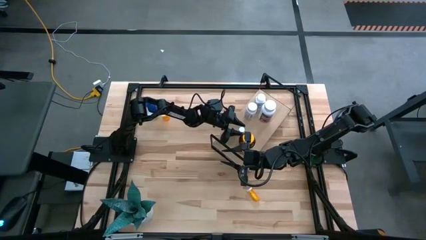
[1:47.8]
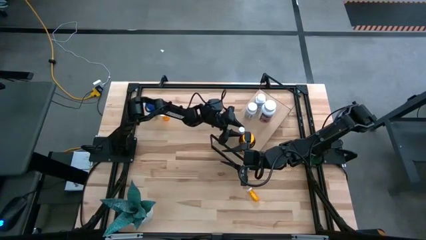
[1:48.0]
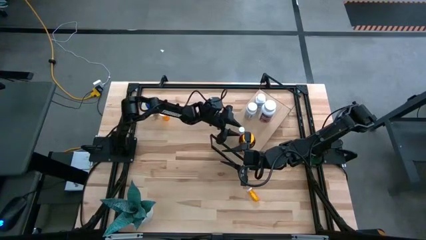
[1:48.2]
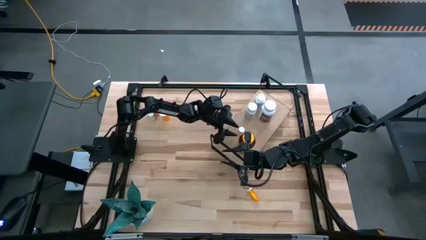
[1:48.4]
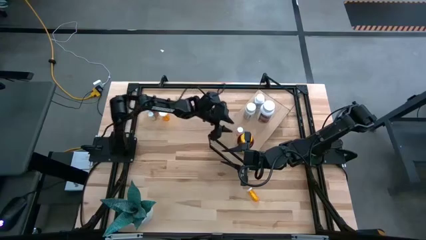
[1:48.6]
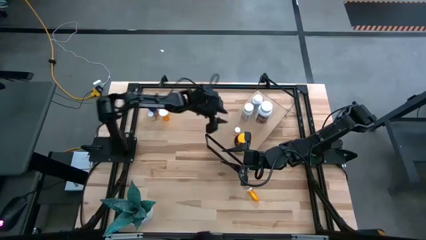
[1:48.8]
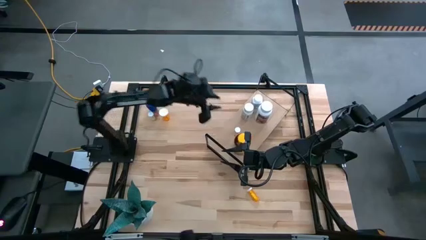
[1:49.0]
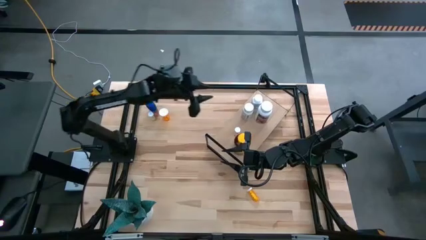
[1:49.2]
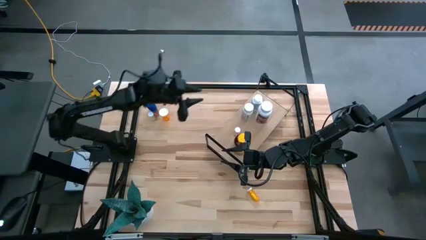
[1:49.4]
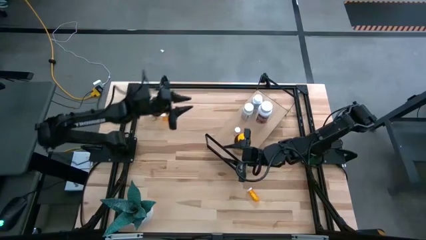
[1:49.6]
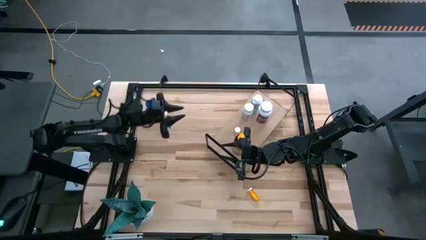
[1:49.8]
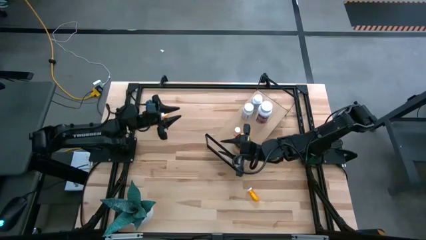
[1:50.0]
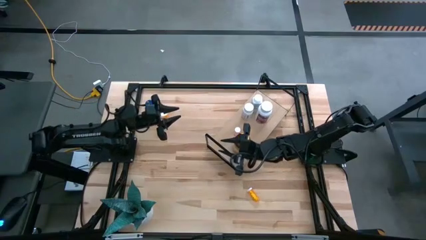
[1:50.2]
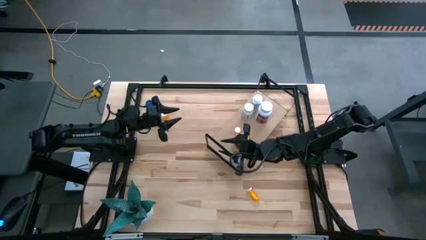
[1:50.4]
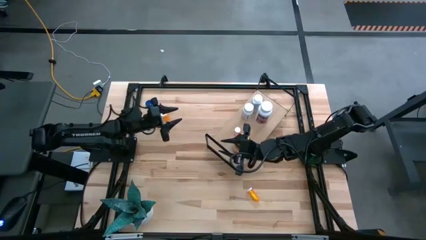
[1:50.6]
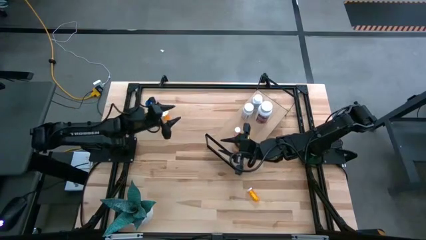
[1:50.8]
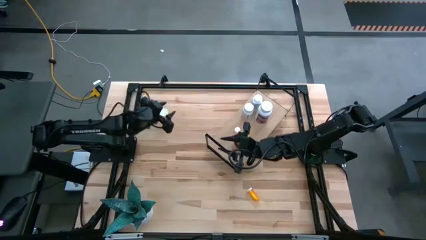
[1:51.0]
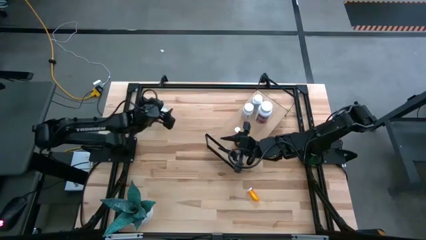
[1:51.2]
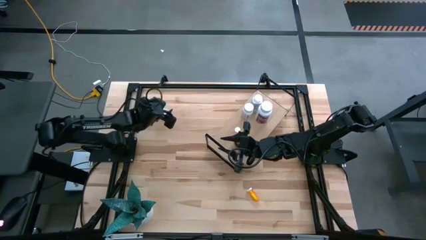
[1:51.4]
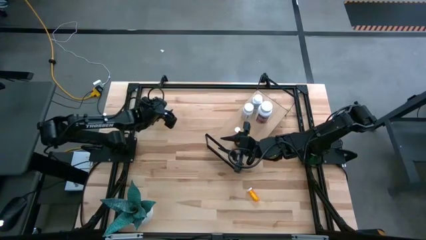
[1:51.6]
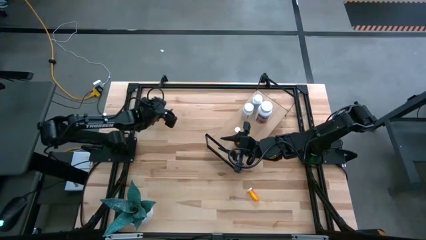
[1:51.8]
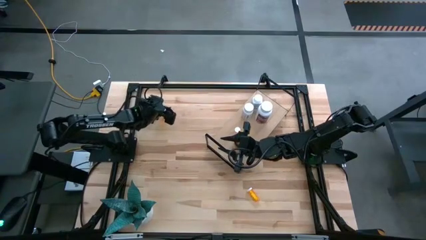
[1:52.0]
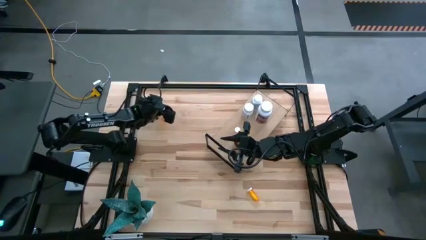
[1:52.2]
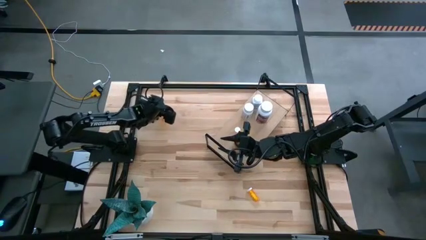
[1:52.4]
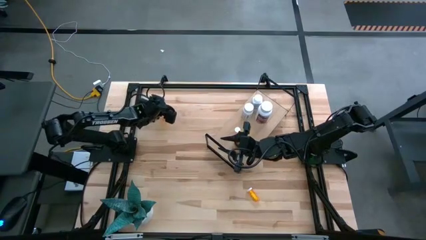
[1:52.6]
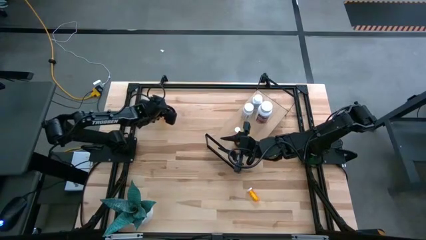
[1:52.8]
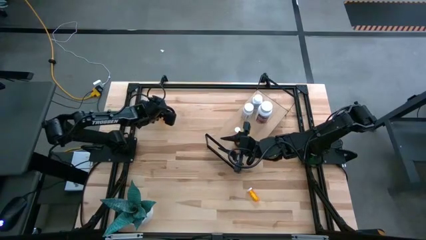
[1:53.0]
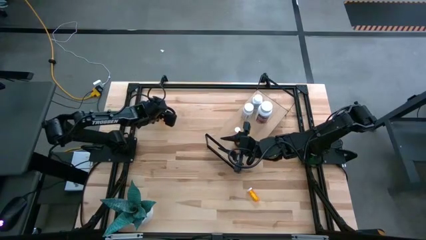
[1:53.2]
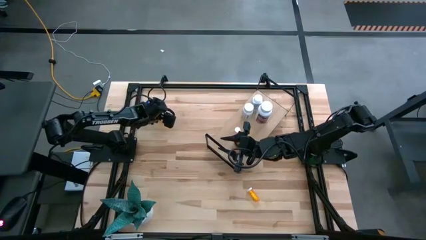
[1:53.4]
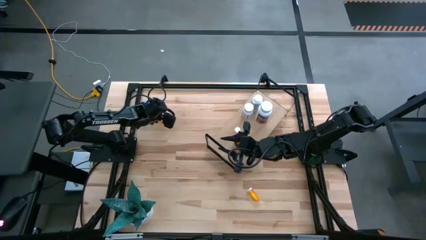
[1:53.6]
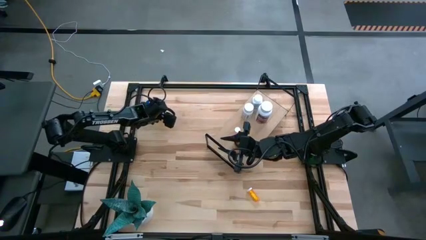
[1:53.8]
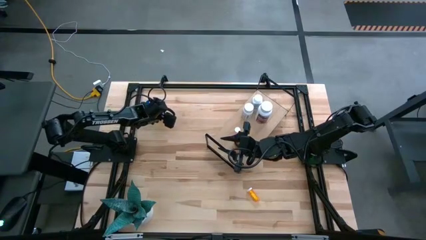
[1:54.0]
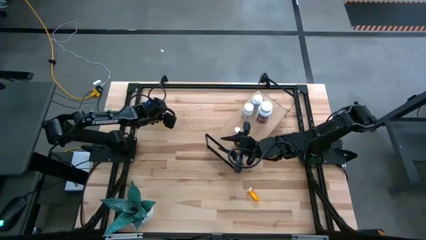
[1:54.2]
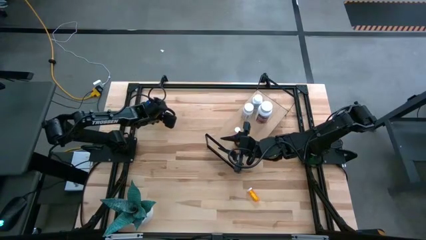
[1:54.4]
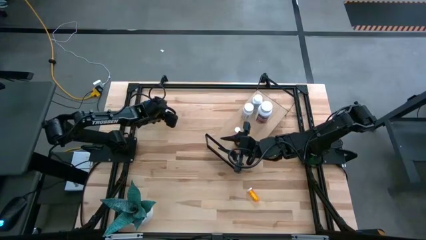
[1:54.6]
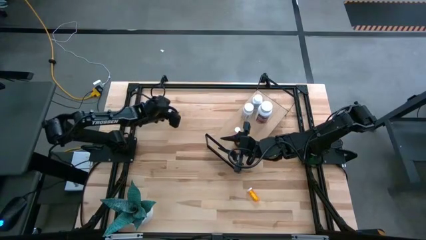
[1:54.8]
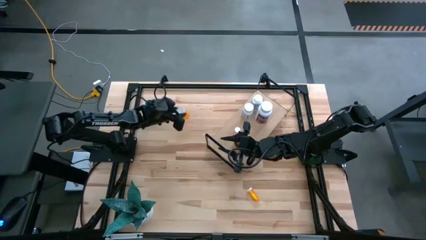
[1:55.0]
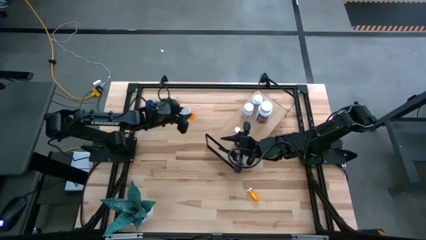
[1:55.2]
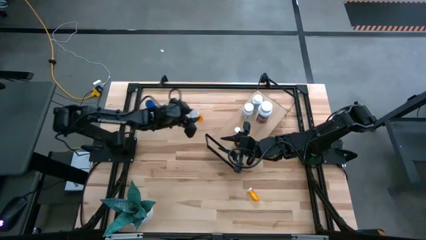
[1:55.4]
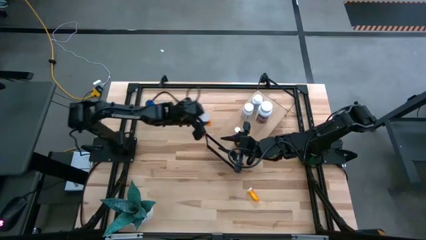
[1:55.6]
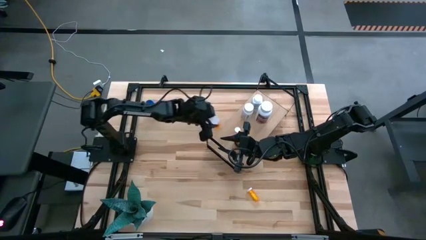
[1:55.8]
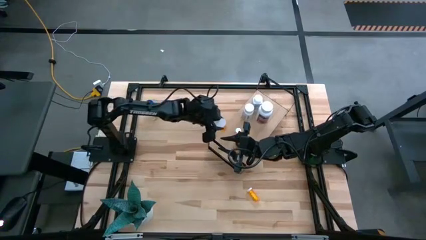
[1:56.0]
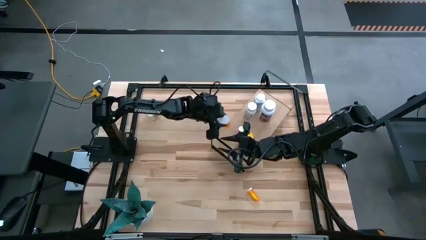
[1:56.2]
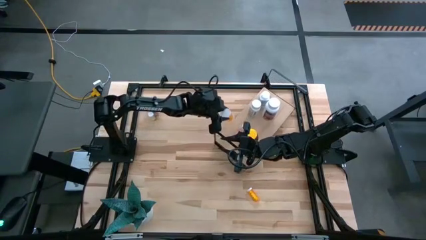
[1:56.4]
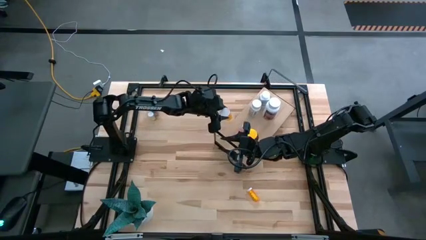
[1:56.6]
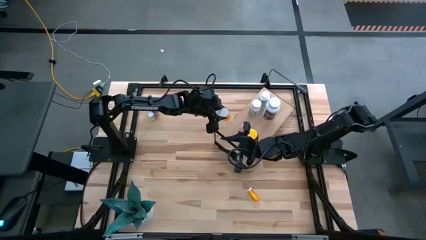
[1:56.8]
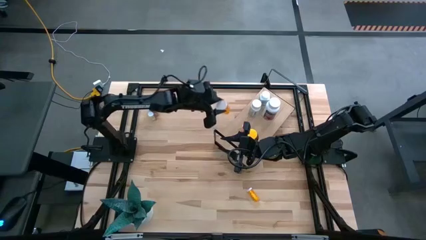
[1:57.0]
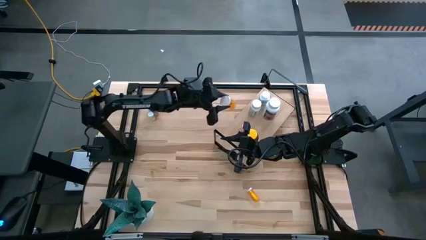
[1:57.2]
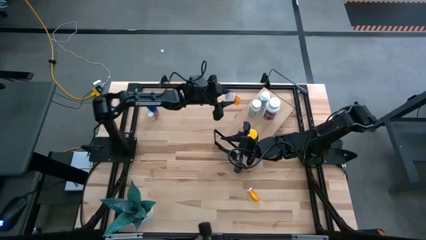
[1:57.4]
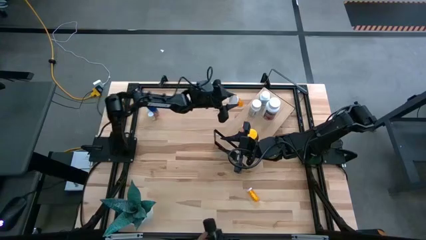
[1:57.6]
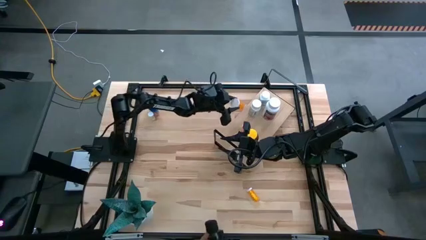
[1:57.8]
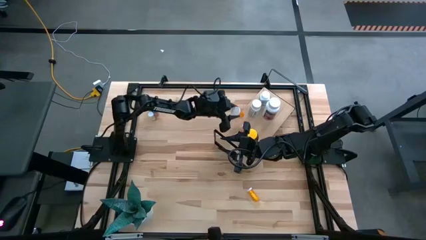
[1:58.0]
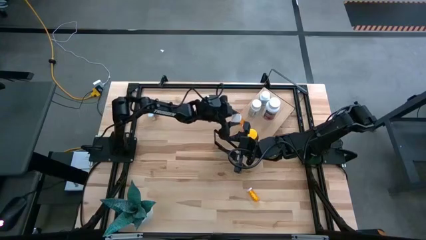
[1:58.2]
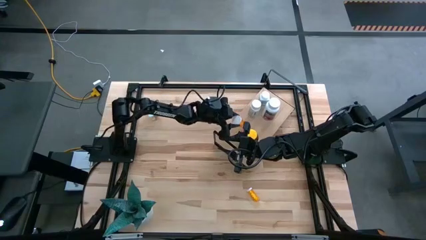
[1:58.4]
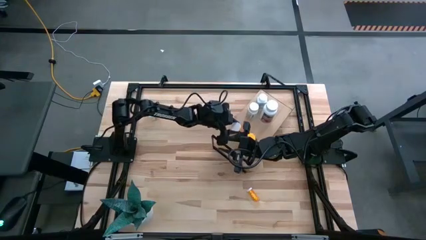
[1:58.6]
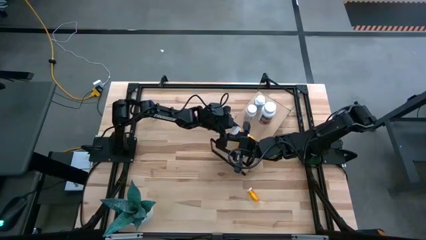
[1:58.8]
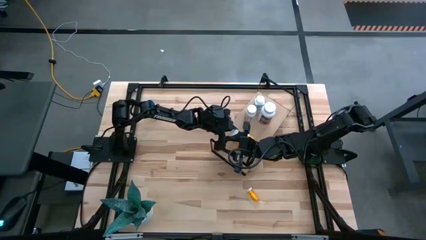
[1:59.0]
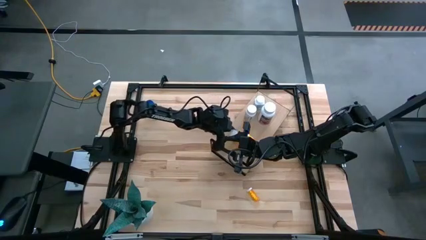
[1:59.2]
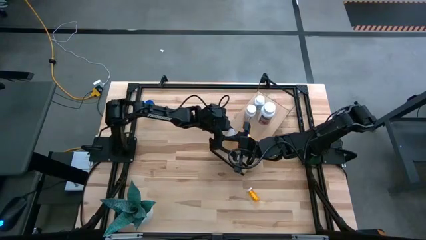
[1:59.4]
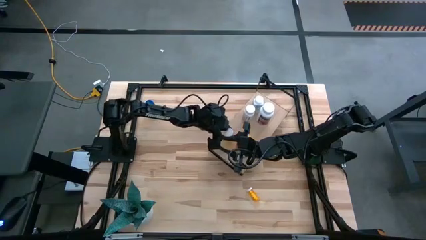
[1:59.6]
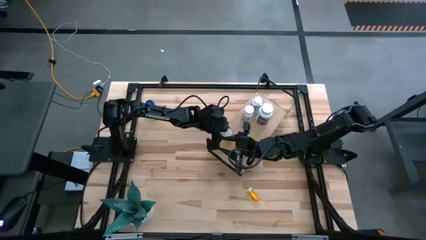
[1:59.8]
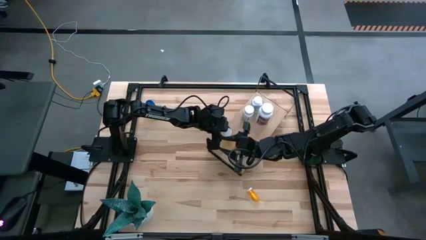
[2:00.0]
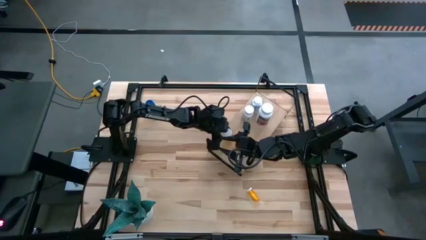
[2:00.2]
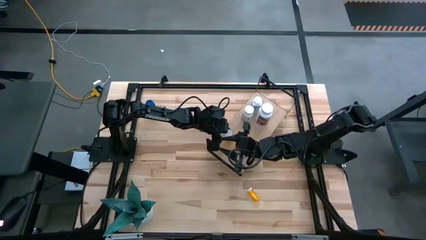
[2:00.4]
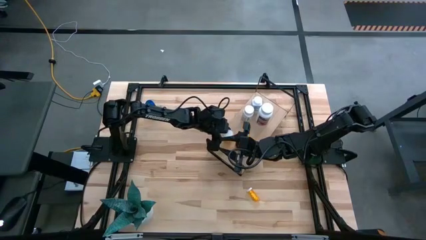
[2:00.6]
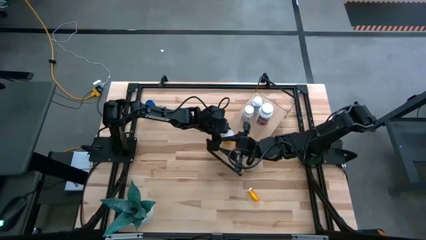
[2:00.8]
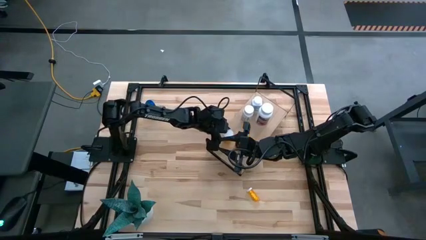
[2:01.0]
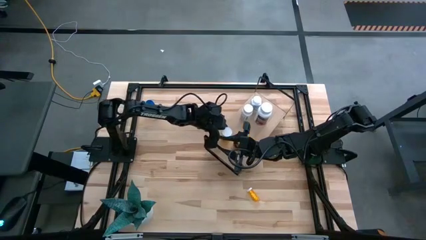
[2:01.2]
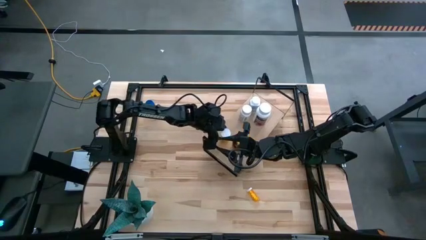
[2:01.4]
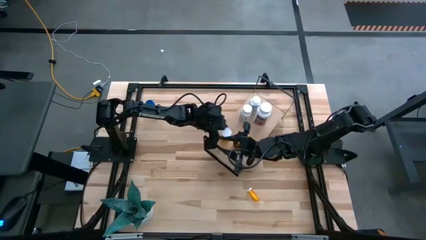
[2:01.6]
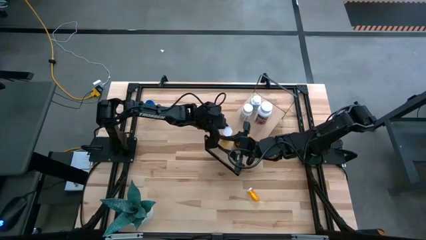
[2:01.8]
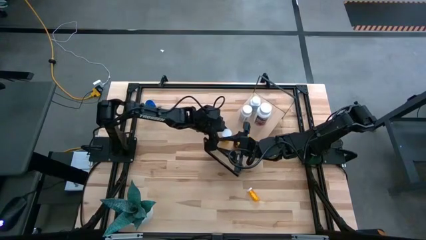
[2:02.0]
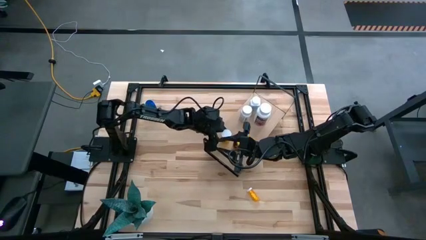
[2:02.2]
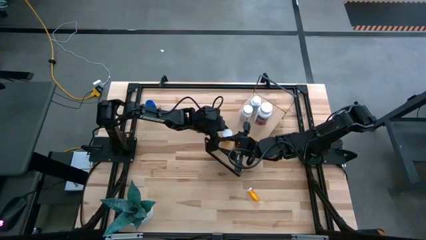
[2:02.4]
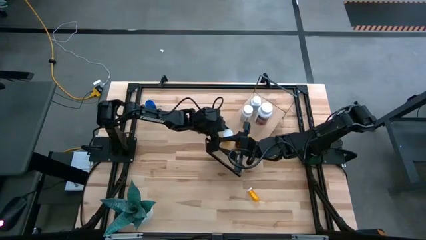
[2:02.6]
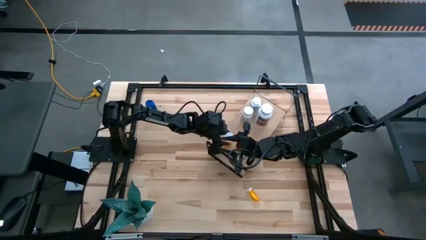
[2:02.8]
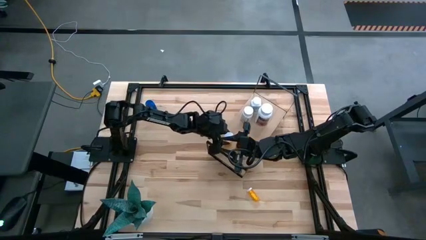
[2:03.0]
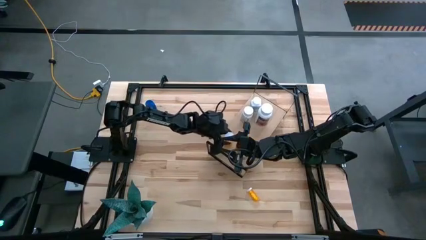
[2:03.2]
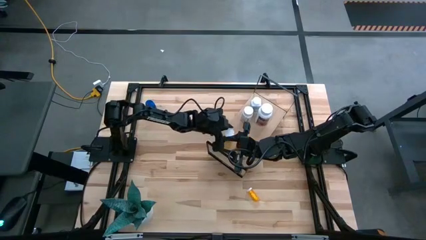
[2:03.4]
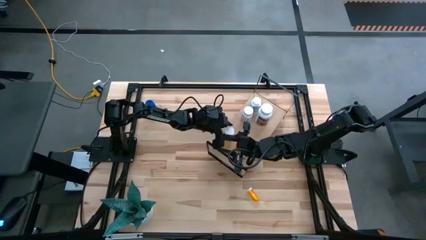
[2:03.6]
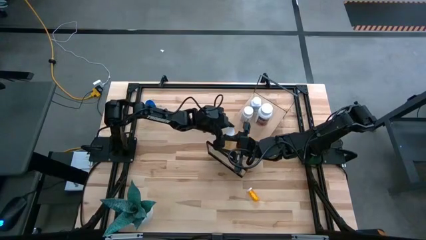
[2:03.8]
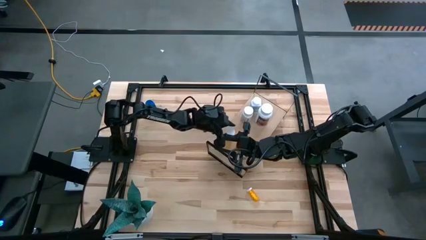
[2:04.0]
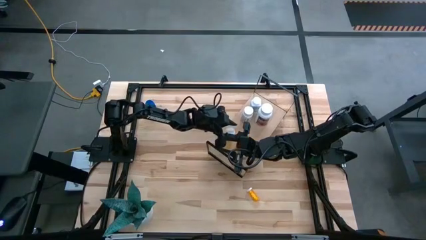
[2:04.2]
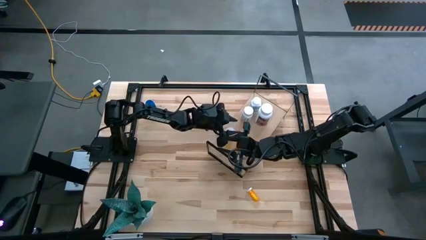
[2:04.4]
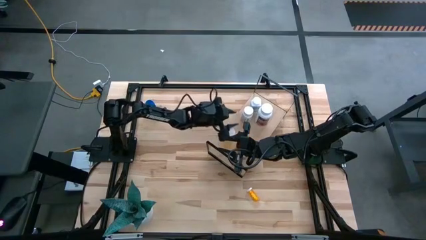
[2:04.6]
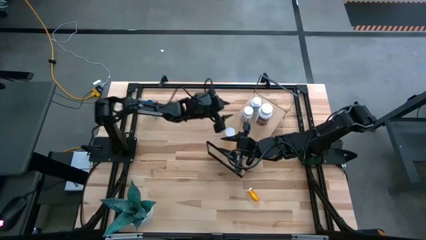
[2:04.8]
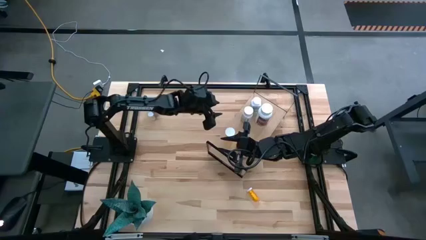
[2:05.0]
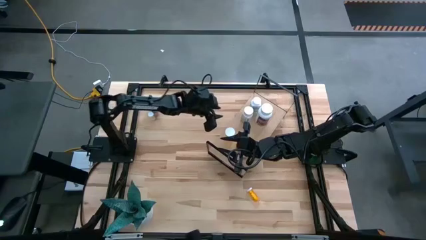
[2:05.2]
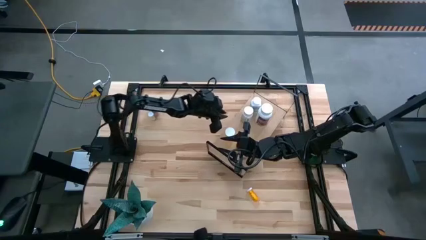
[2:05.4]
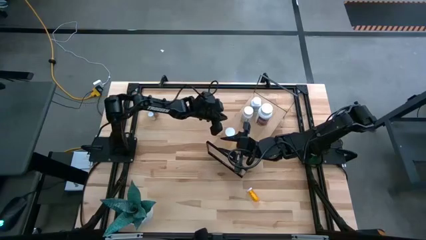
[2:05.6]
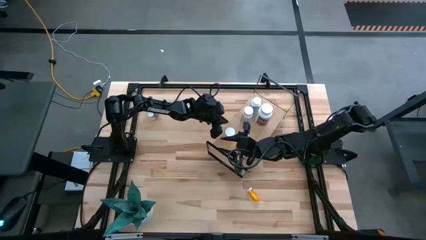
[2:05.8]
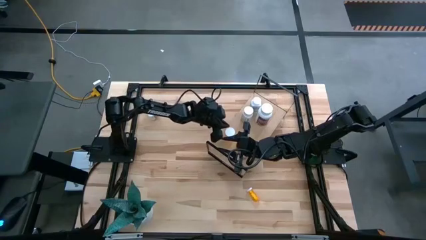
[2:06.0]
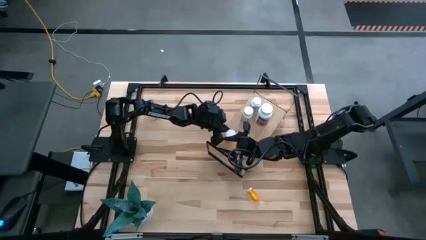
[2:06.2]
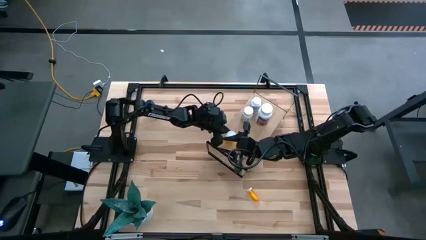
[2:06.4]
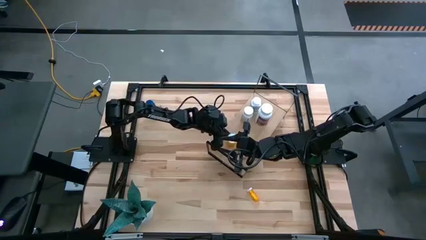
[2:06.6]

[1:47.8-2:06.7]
Task: Pick and place medicine bottles onto shelf by color
Put the orange pill bottle on the shelf
